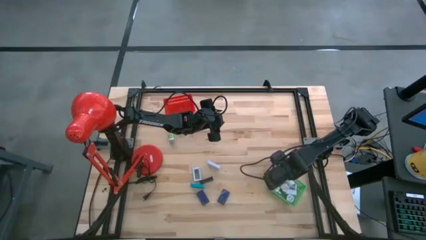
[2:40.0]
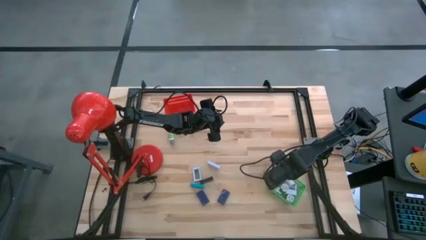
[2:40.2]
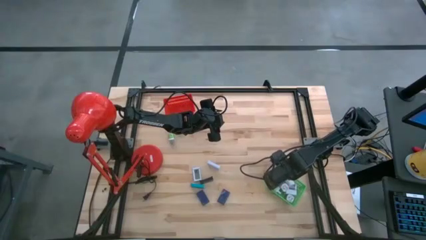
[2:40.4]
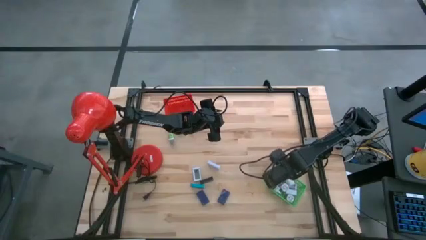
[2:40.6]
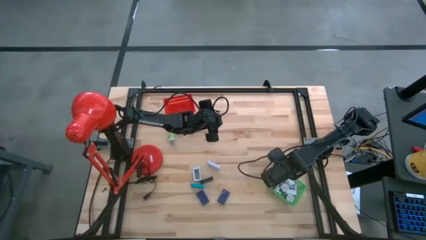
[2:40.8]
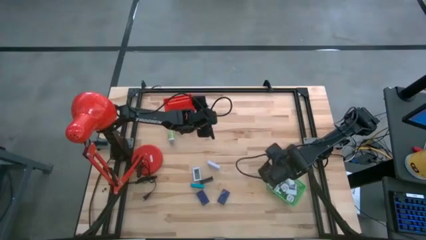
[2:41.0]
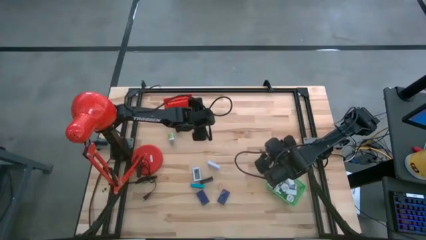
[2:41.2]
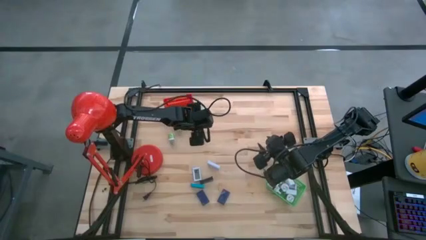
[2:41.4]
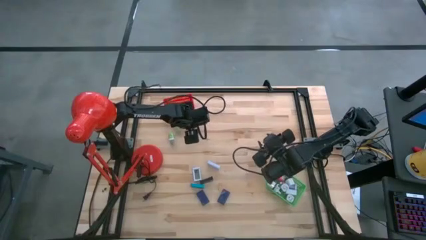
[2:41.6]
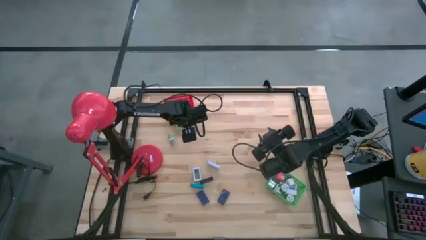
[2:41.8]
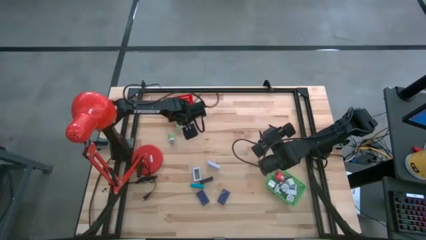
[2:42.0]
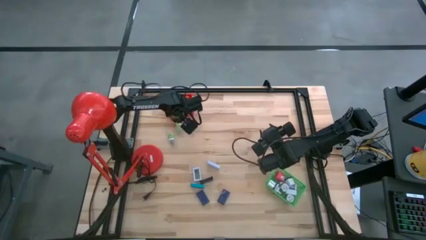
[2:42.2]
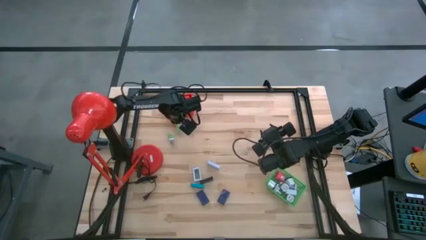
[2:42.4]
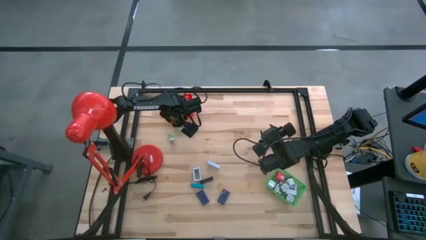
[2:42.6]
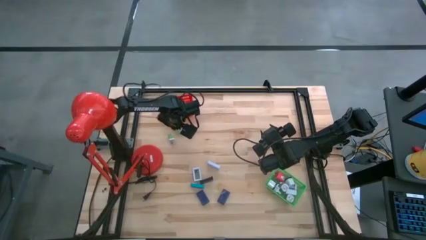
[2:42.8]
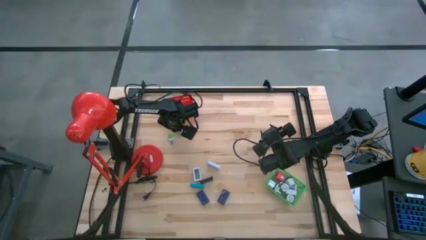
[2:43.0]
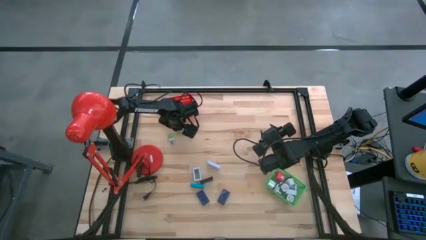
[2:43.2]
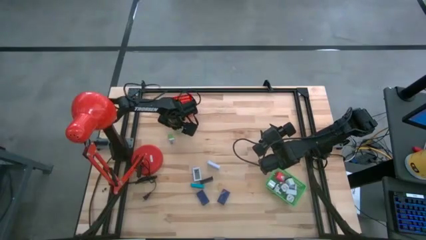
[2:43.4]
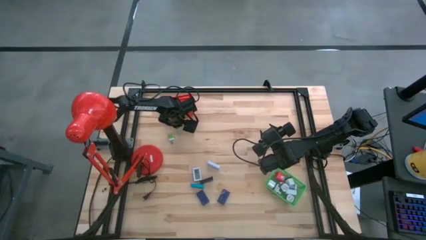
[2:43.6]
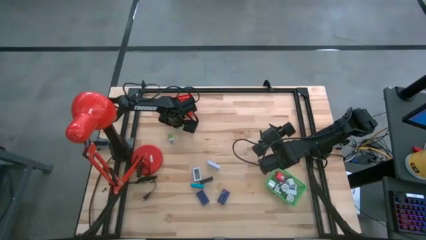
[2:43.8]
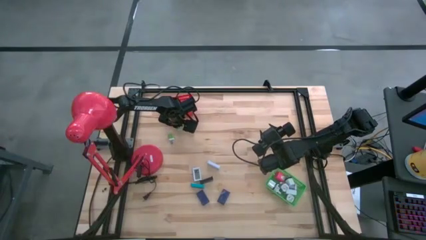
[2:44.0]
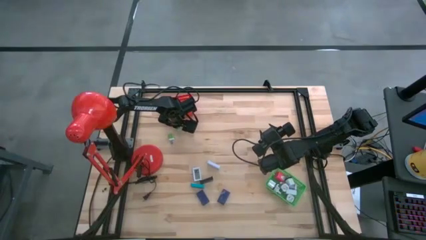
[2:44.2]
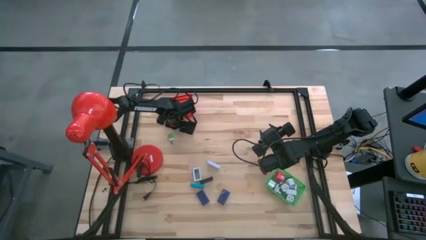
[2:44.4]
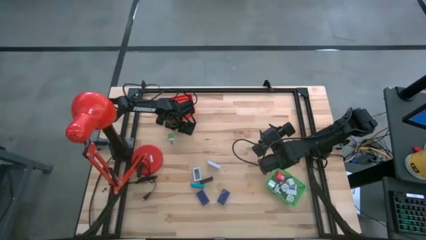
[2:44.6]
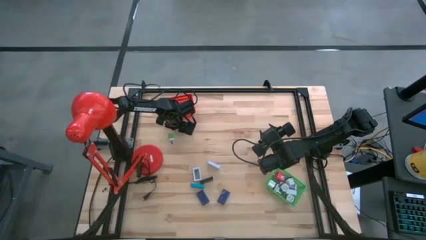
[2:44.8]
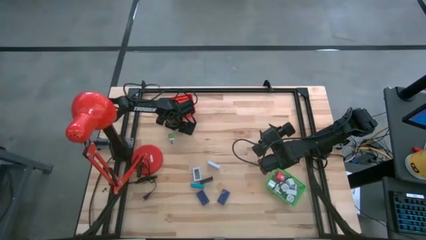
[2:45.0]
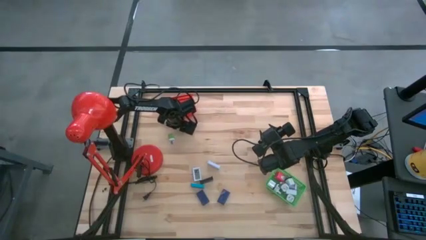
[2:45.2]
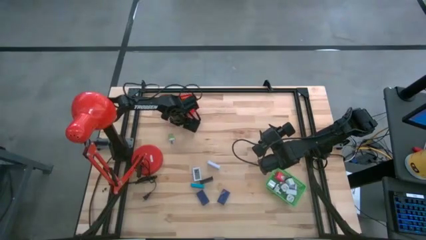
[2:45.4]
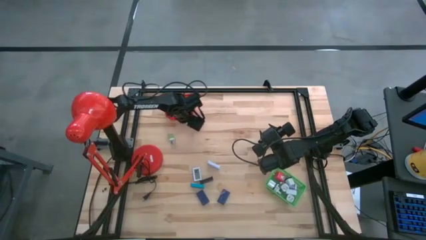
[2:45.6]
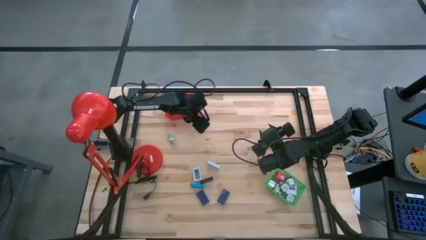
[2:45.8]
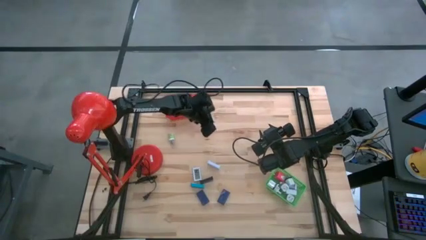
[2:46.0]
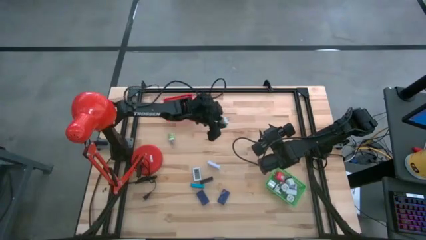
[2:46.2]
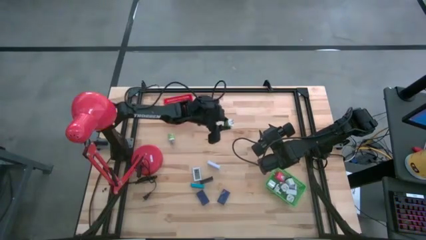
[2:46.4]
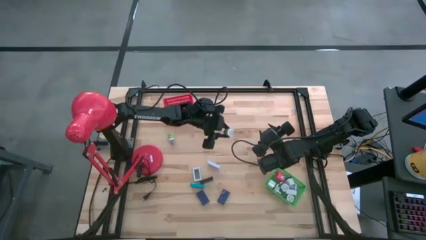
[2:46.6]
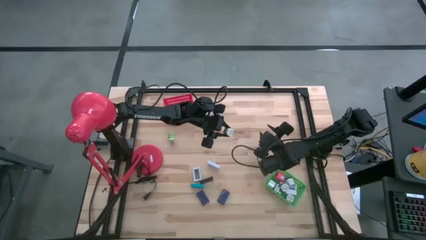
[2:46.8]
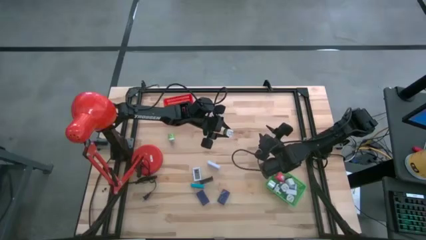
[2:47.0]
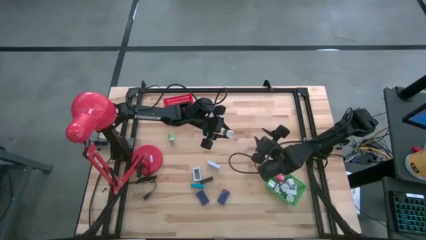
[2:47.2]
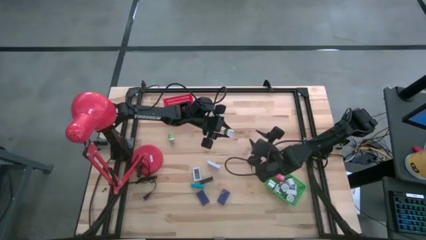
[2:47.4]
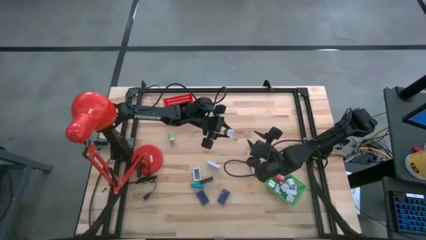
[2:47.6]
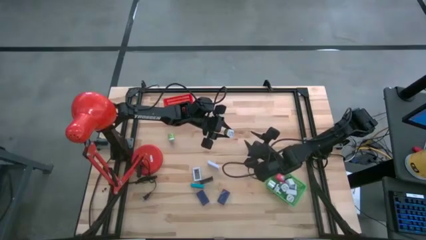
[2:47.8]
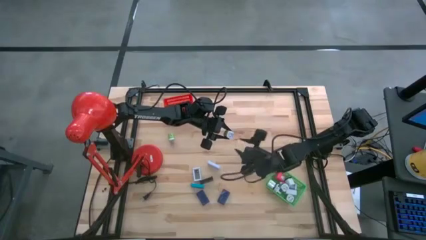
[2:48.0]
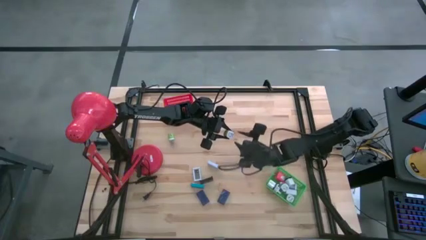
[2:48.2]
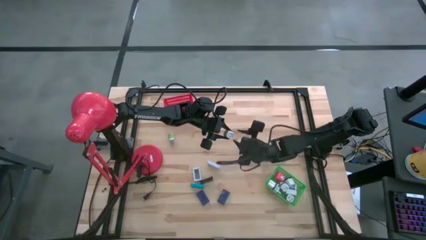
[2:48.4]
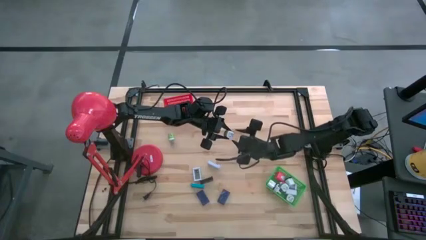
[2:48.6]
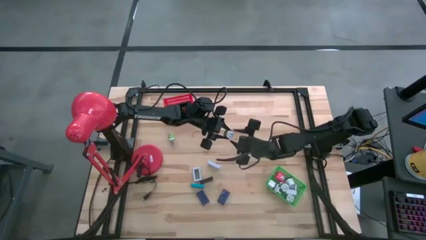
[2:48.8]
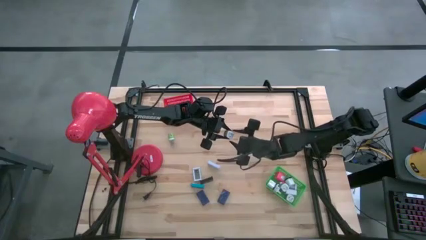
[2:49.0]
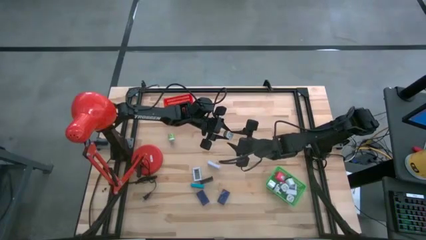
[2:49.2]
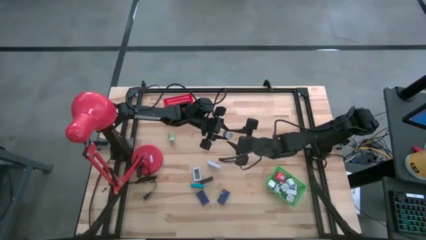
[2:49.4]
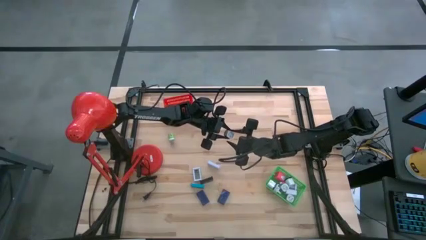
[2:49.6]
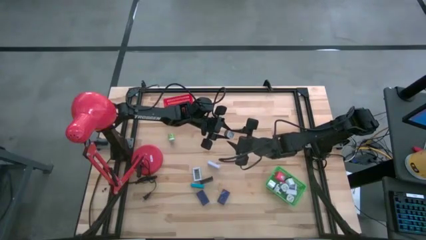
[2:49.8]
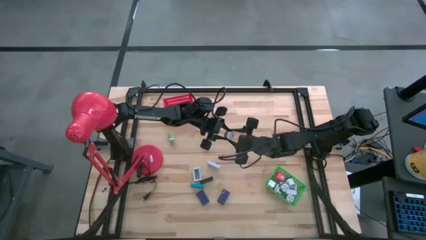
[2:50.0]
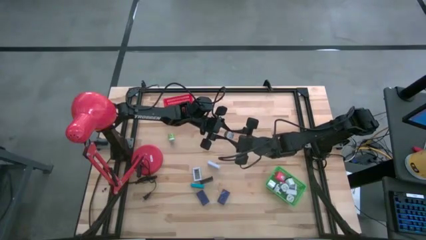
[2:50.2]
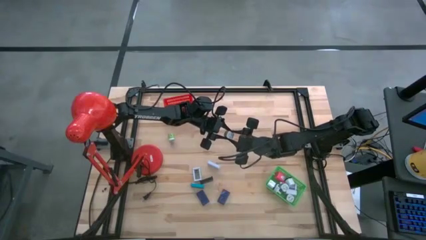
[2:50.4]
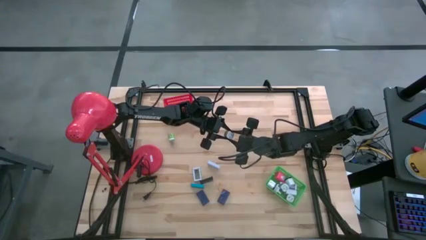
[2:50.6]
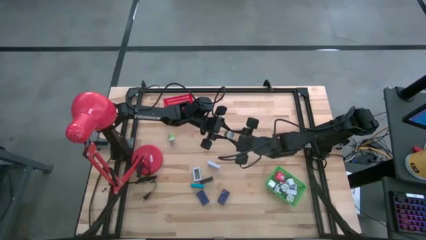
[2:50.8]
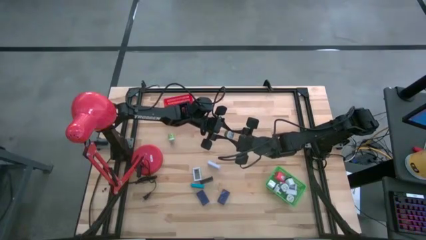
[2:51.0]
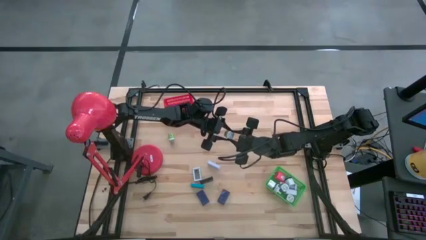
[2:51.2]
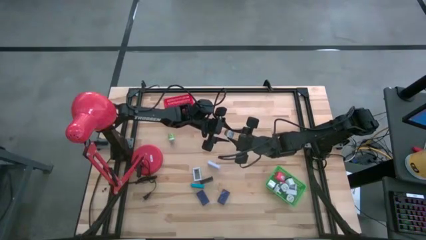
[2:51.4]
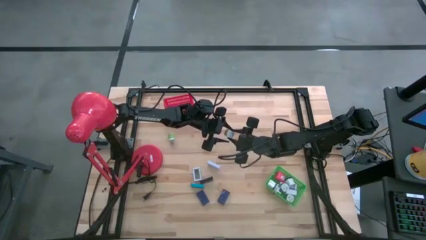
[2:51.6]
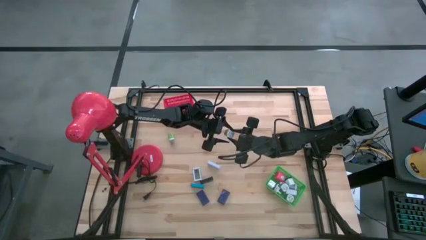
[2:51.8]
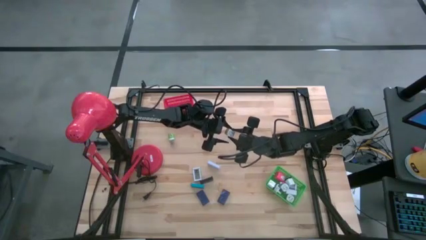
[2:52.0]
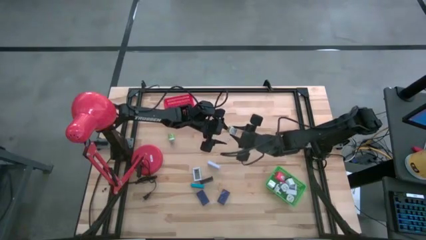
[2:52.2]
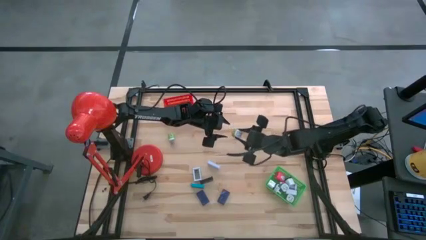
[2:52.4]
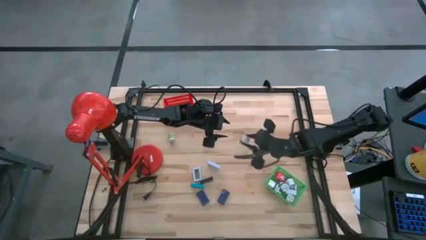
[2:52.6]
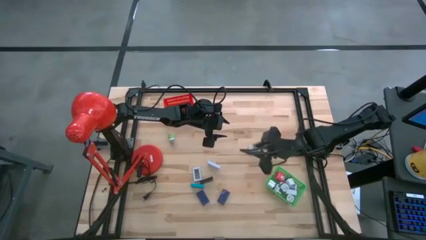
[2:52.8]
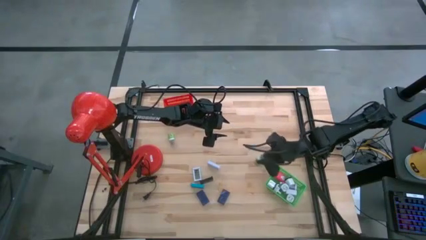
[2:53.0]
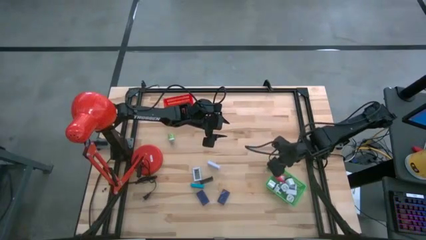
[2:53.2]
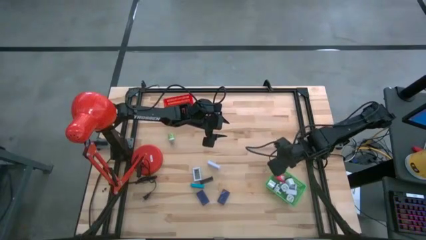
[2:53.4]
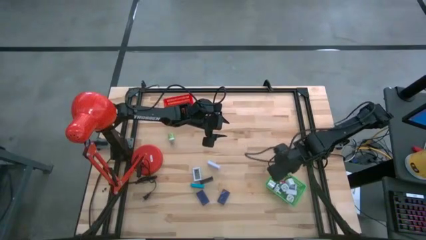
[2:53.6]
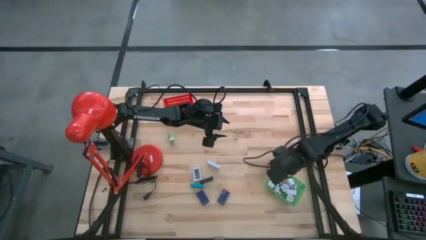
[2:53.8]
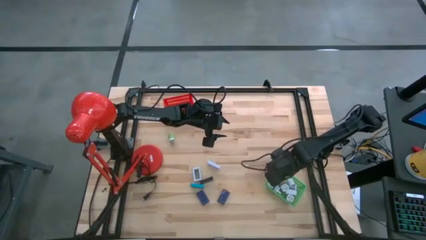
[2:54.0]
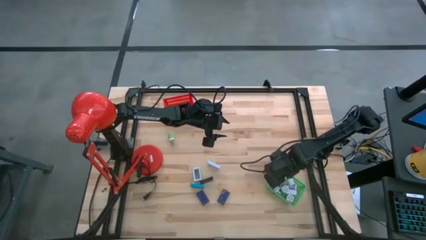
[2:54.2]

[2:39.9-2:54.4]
Task: Pick & Place Office items
Put the right green charger adapter into the green bin

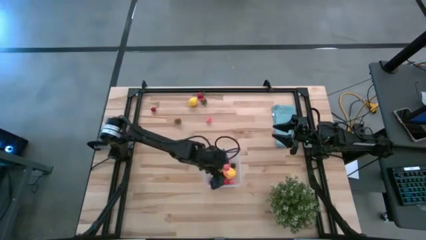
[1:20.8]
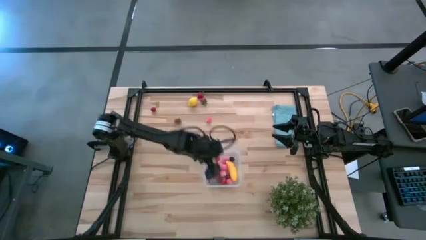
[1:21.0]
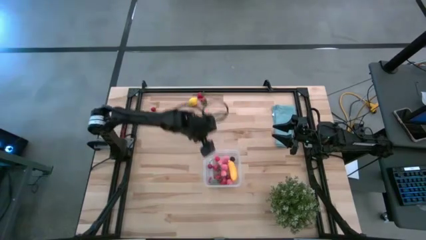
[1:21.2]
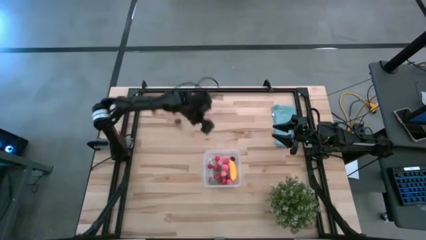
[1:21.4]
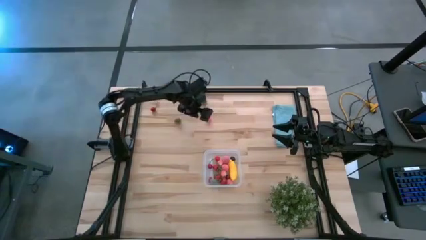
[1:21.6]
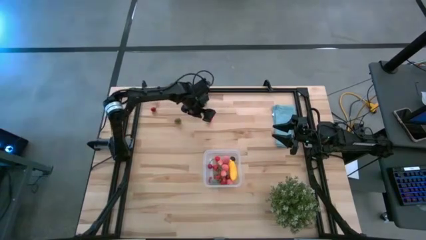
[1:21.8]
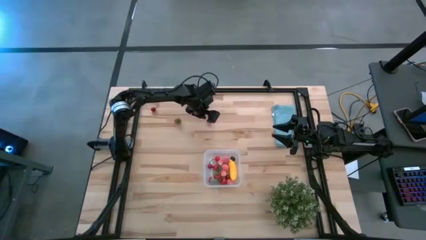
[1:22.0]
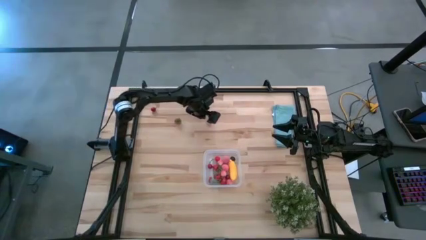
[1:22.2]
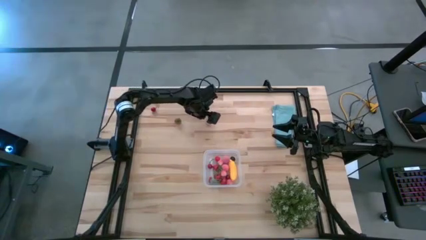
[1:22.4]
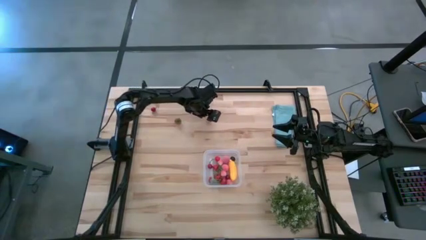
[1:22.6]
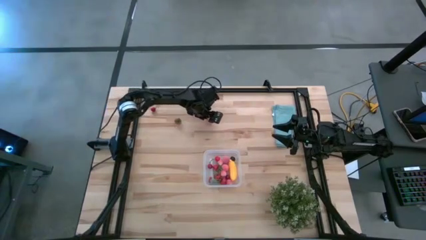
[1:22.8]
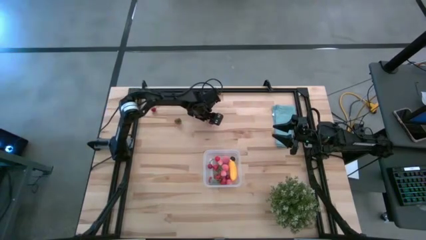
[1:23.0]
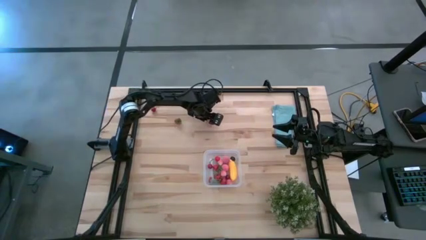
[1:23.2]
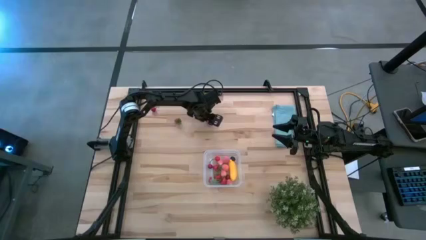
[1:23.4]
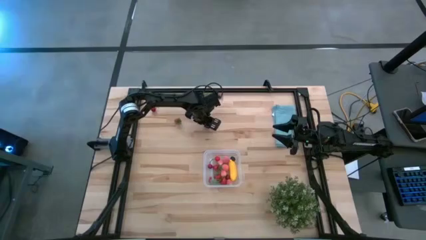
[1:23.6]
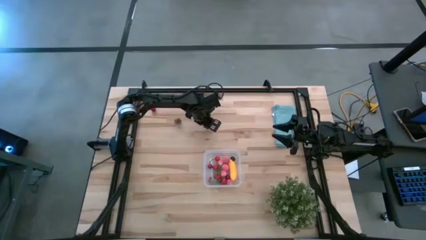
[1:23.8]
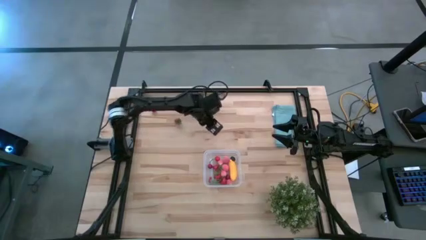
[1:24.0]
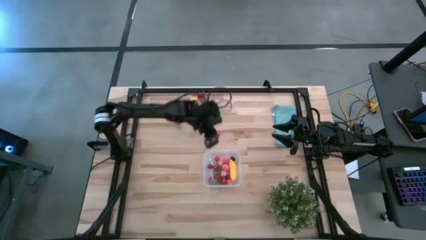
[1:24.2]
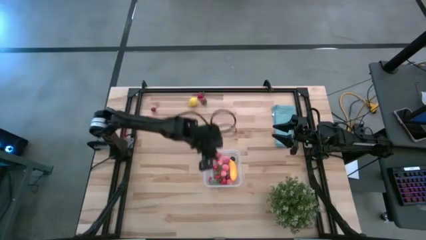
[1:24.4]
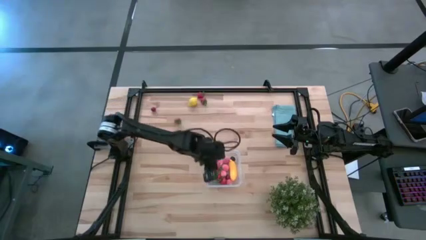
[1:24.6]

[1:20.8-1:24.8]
Task: Pick and placing Produce into tupperware
Put the pink peach into the transparent bin
